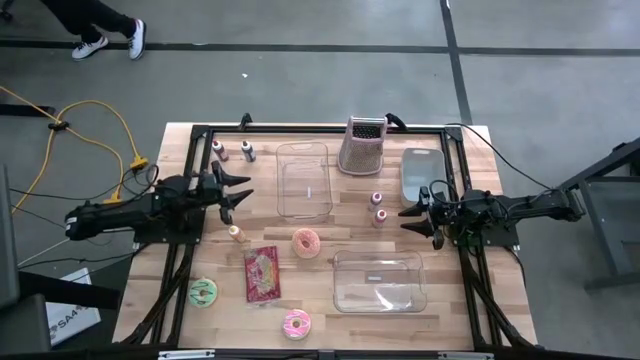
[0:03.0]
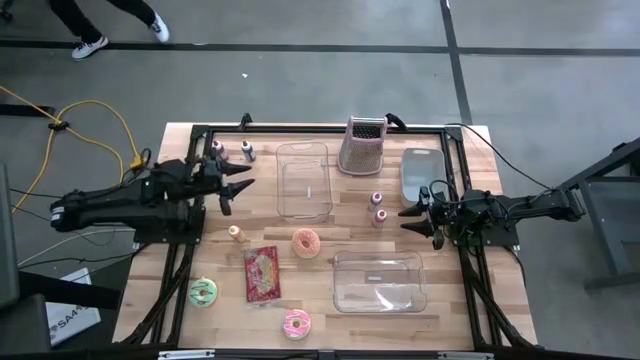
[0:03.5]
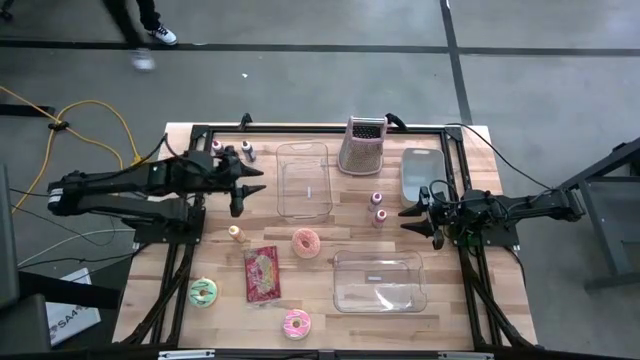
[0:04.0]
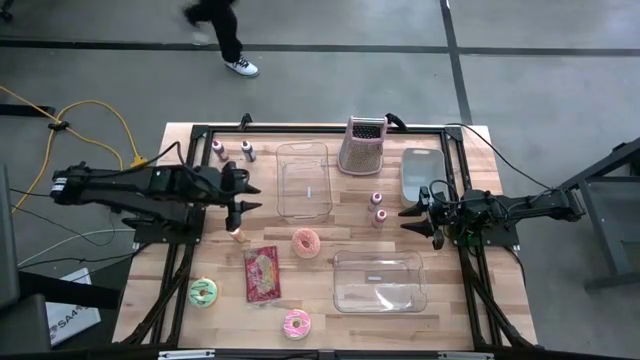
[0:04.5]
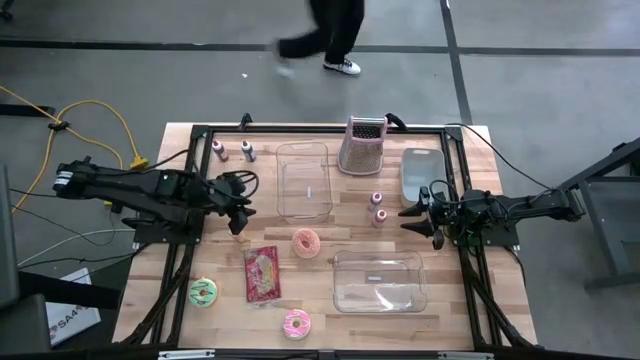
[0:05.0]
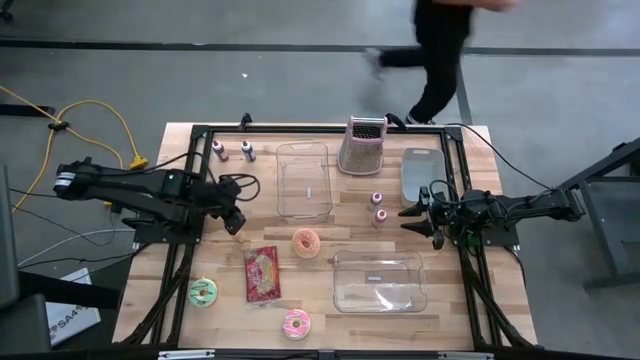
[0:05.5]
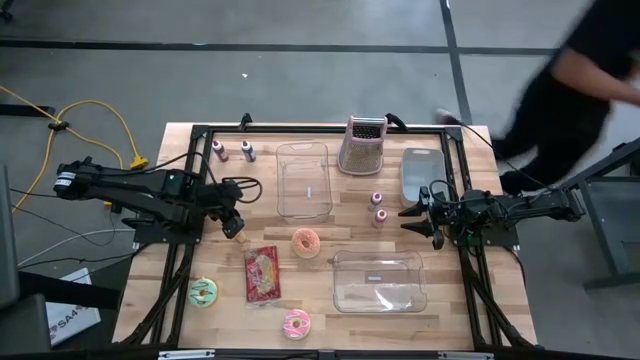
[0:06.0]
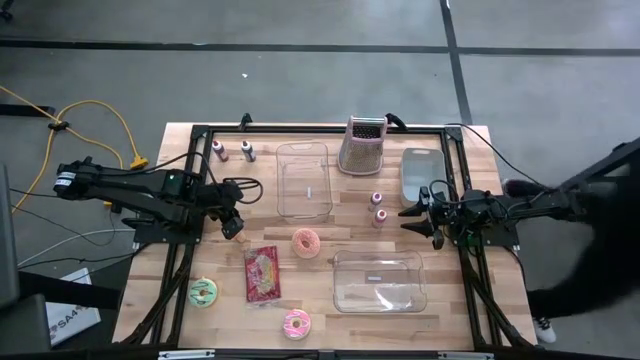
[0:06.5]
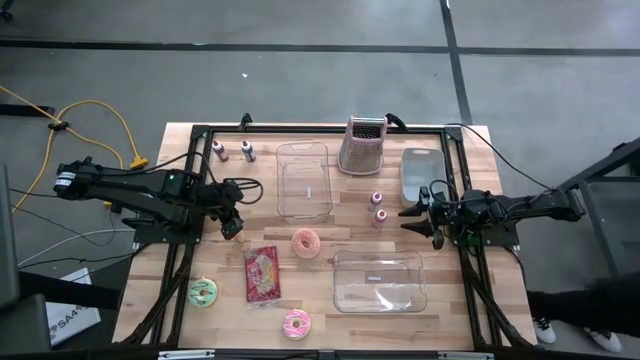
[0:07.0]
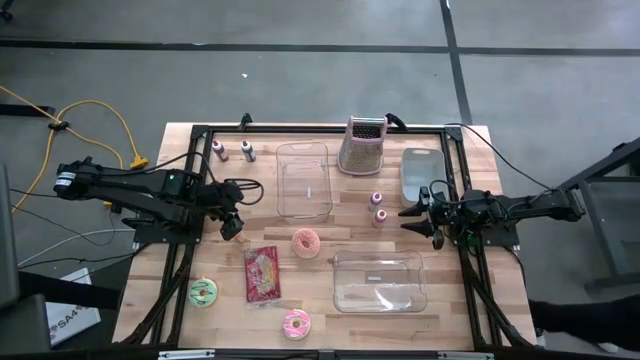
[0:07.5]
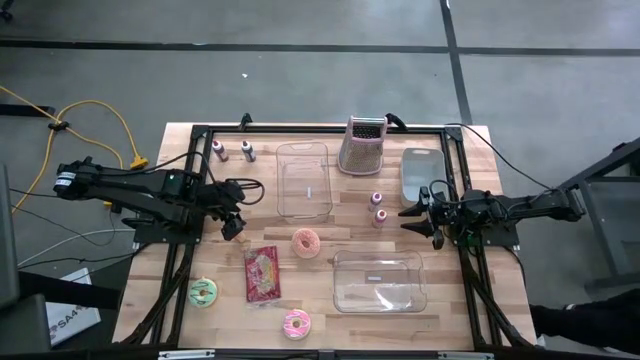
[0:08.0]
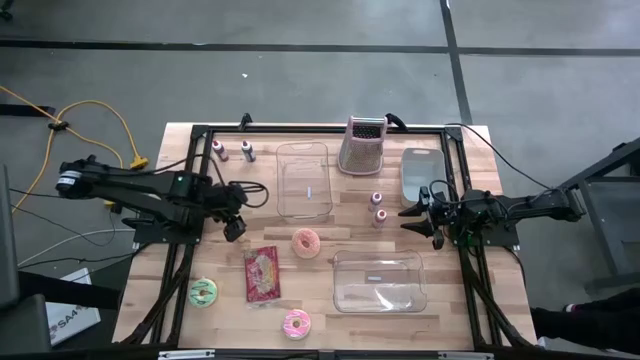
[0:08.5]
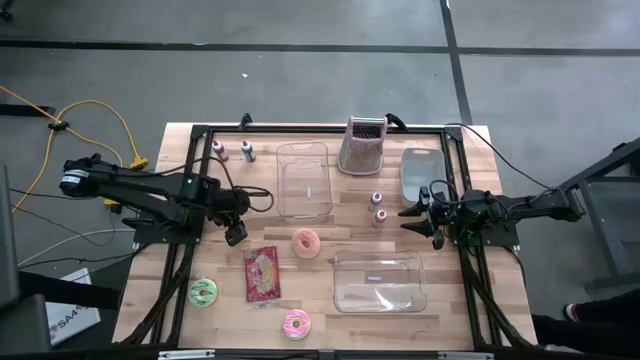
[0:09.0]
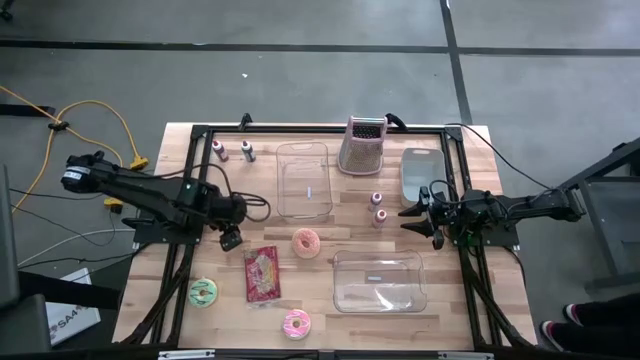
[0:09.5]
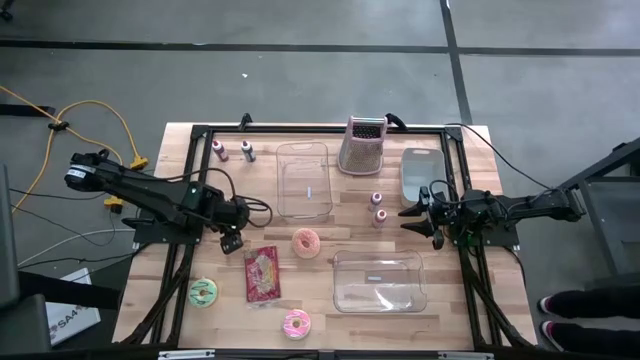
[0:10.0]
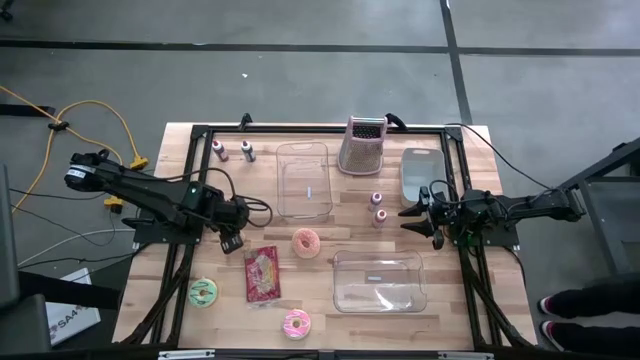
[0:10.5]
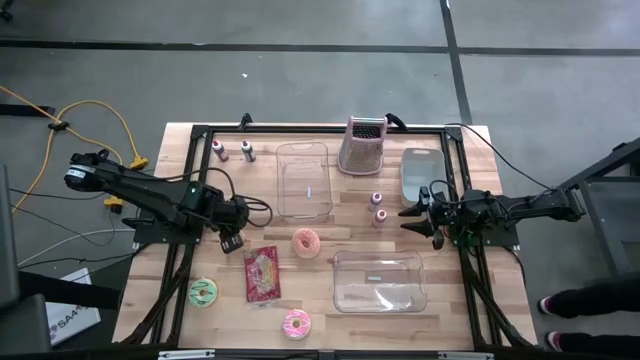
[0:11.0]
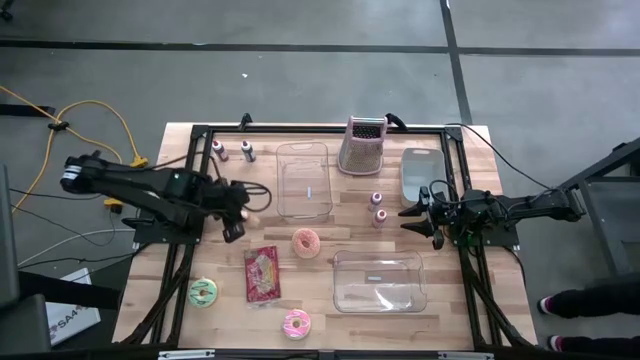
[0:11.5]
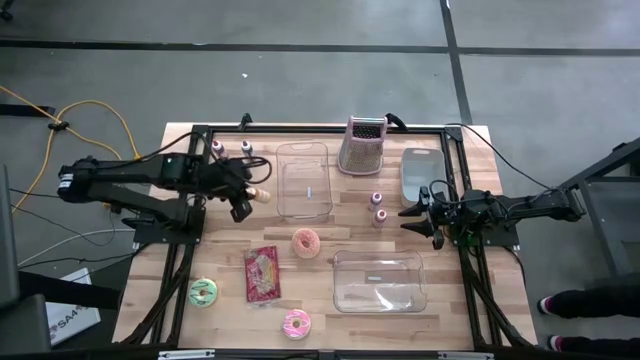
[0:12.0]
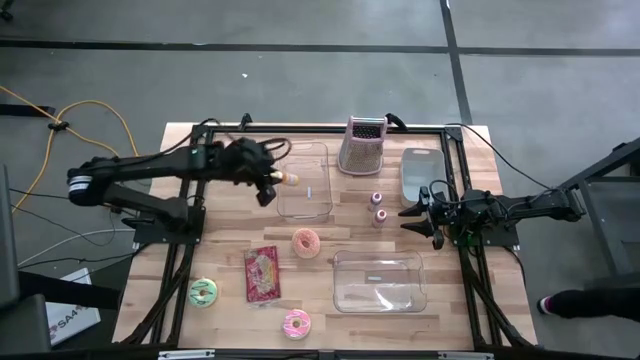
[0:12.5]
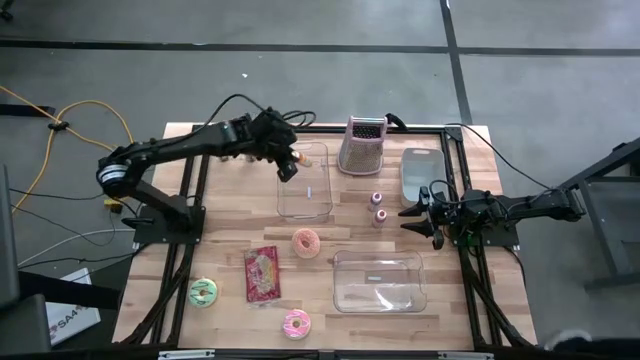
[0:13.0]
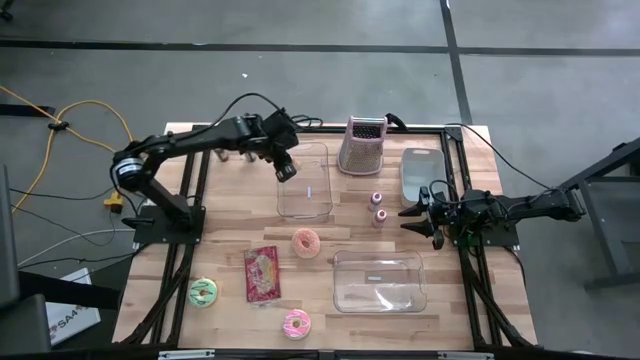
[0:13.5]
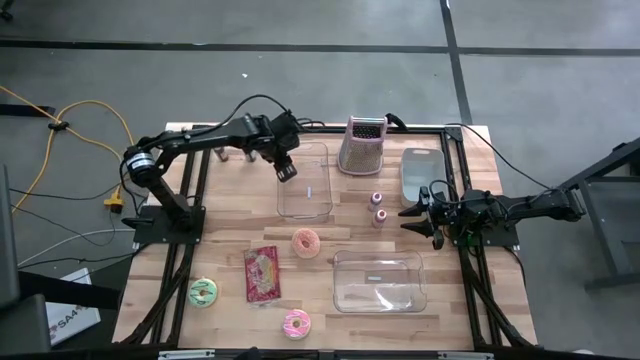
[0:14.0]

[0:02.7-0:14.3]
Put the yellow food coloring bottle into the top transparent bin

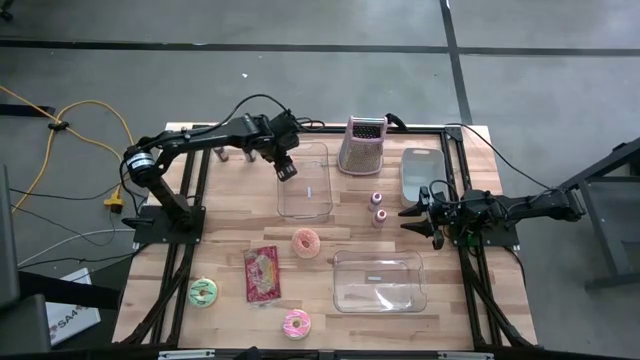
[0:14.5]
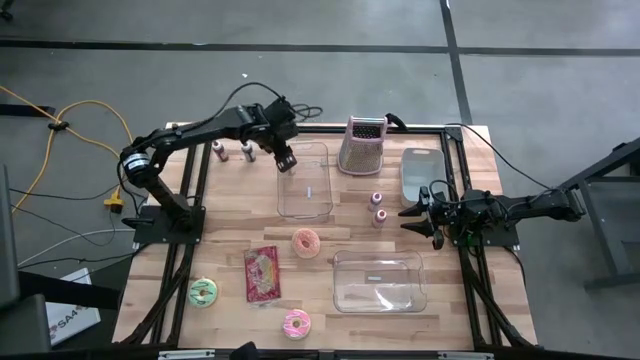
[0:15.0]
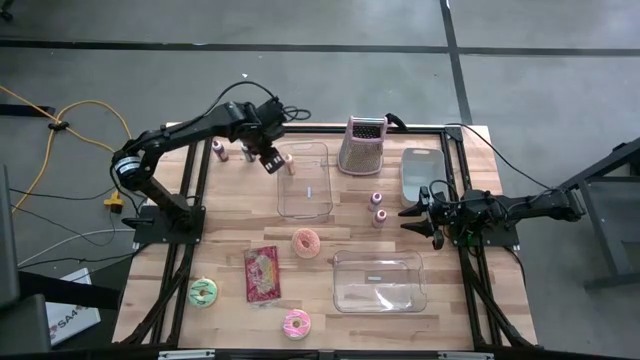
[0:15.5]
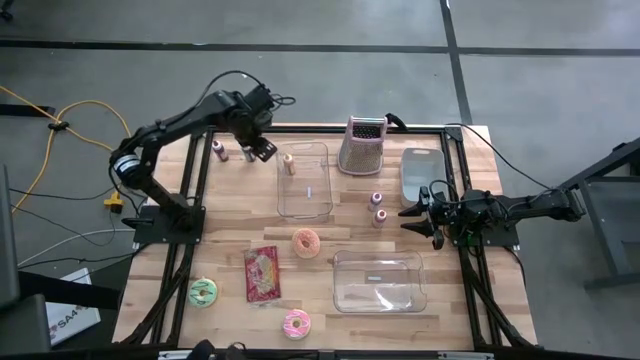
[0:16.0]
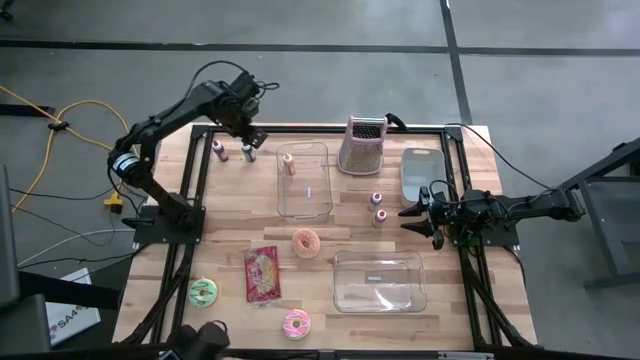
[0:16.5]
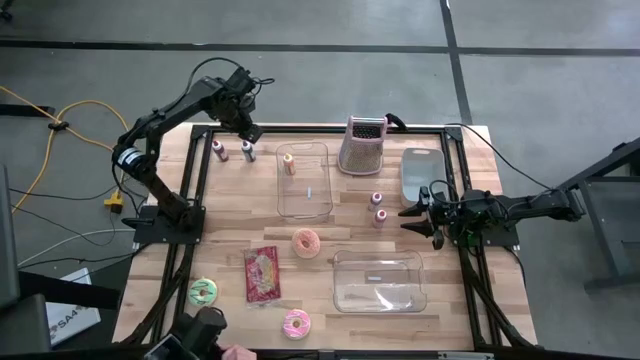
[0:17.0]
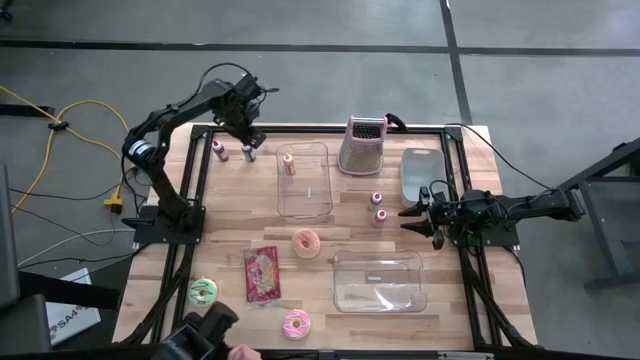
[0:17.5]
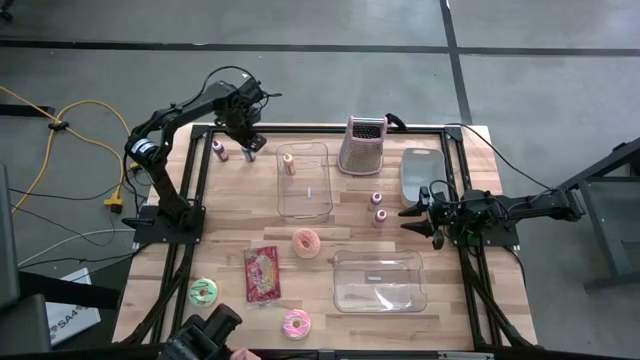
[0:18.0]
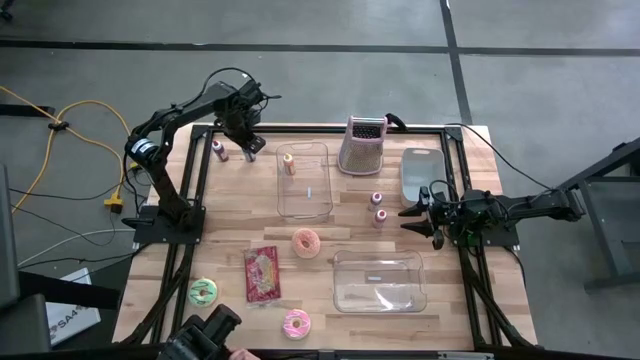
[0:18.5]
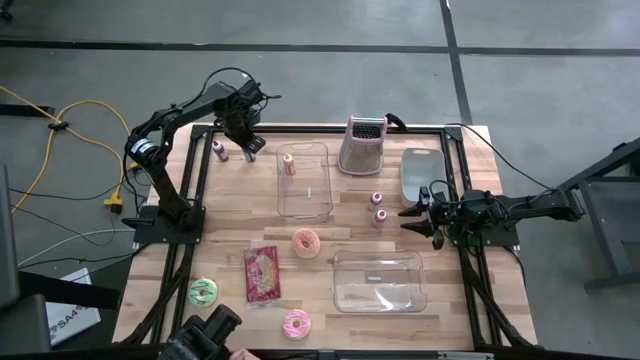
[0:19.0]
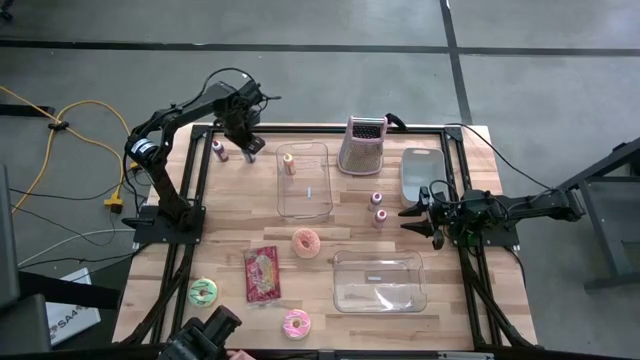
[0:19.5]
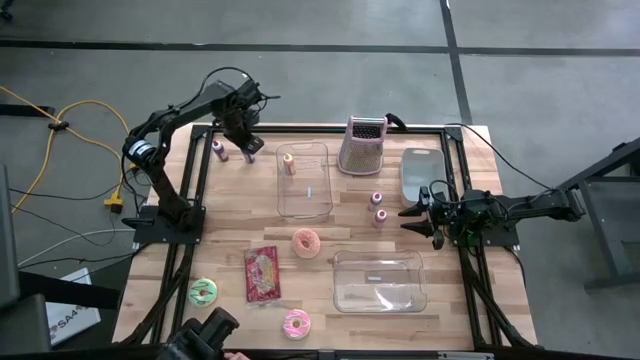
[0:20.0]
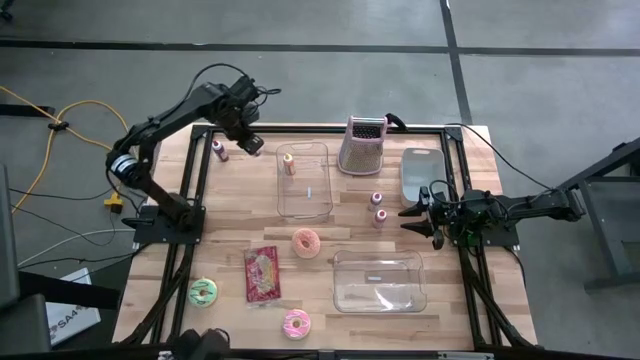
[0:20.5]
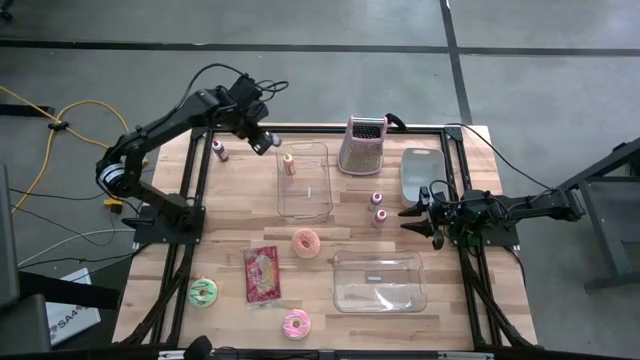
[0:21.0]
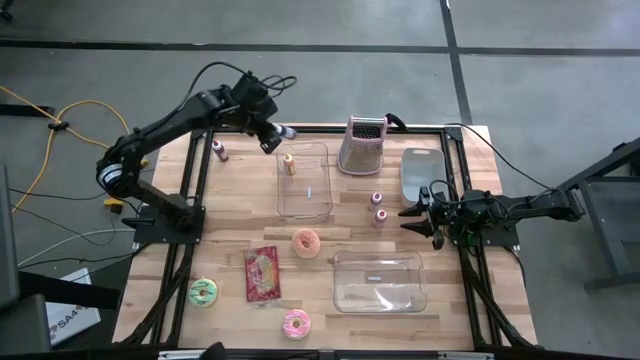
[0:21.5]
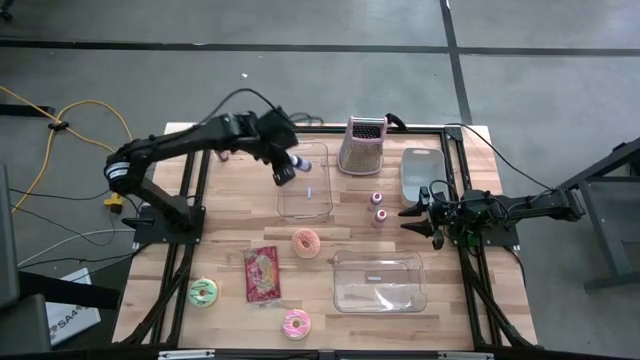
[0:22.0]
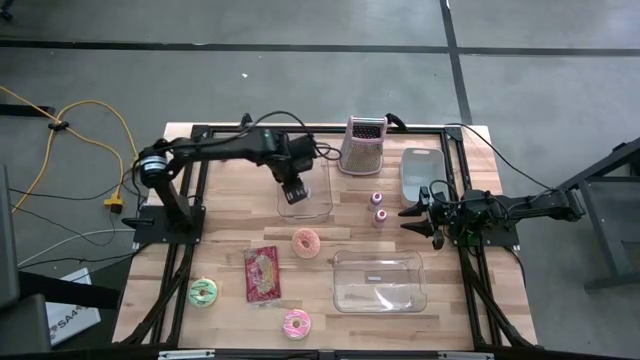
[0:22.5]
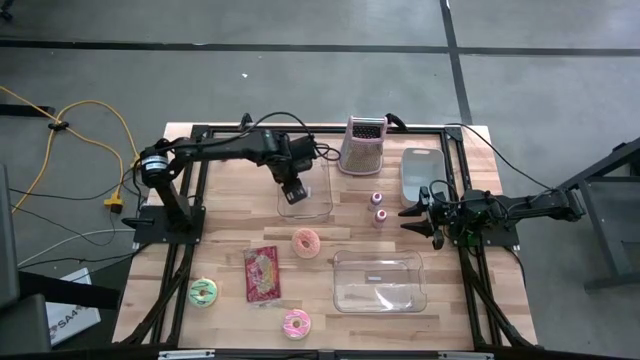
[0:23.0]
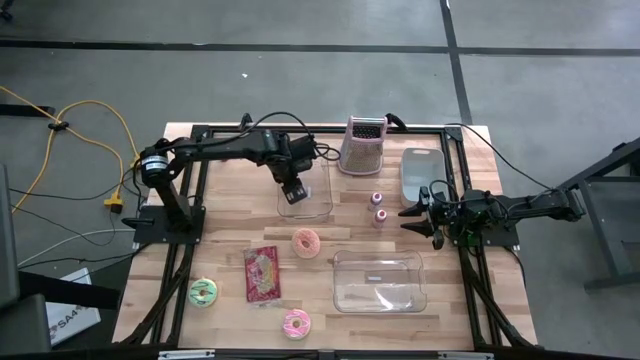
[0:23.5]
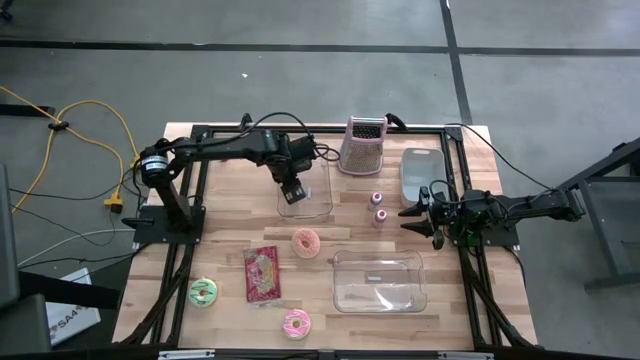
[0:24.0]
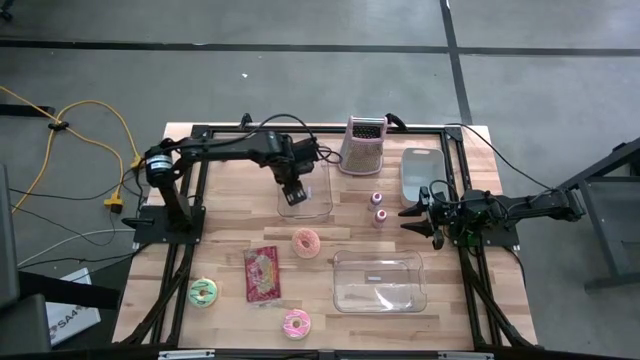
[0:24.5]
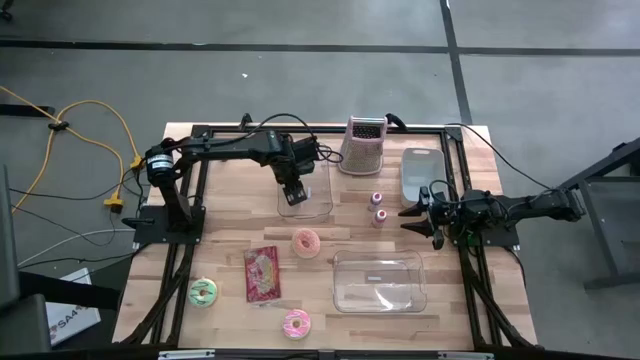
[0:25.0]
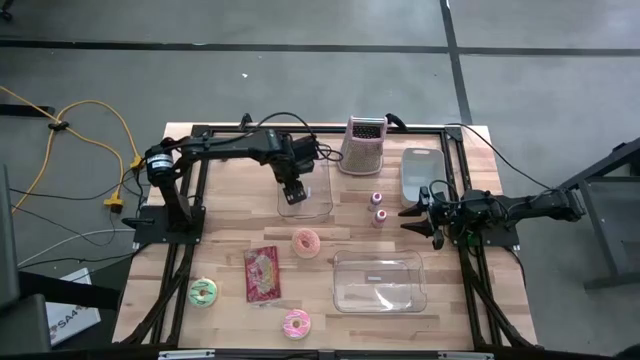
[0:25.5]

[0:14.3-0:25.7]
Put the purple food coloring bottle into the top transparent bin
